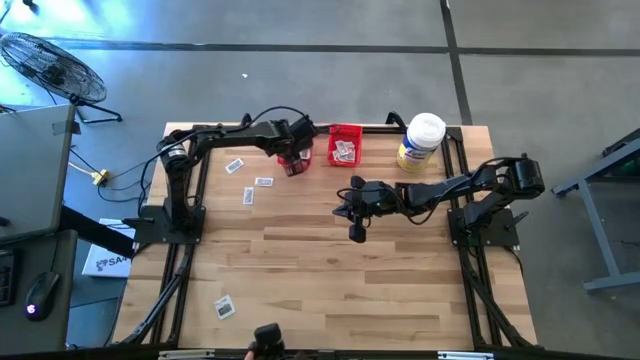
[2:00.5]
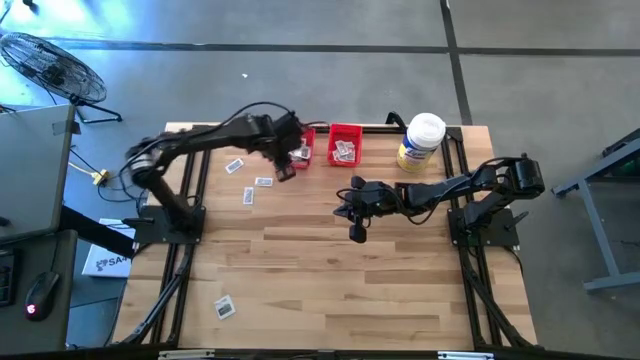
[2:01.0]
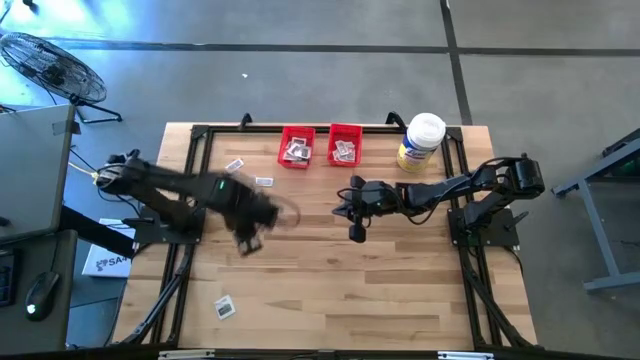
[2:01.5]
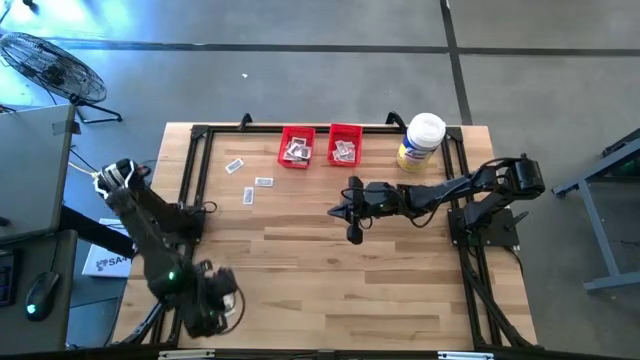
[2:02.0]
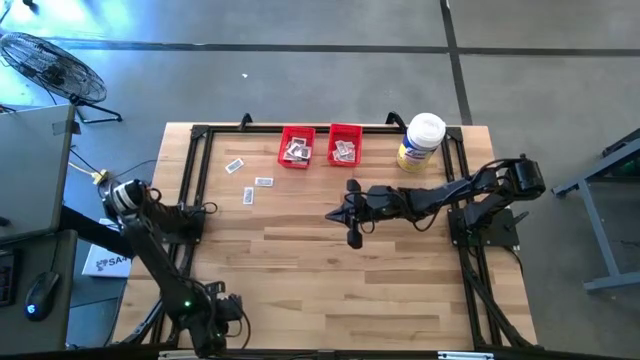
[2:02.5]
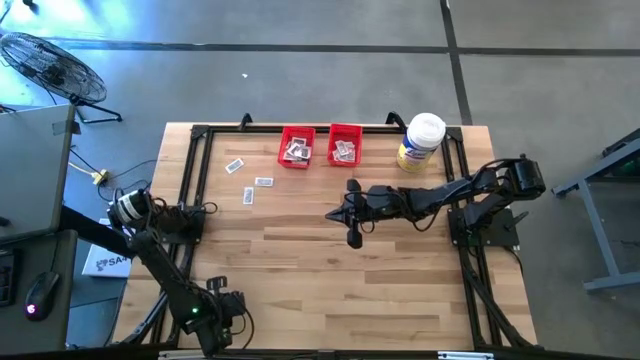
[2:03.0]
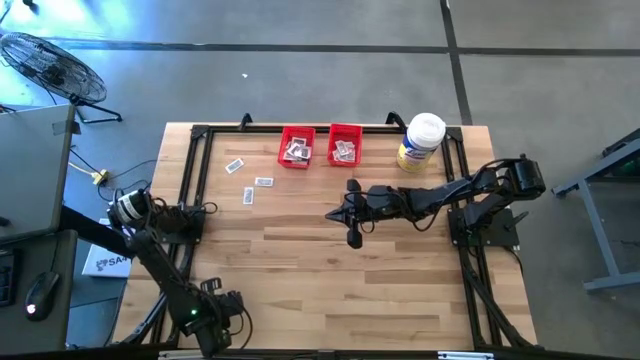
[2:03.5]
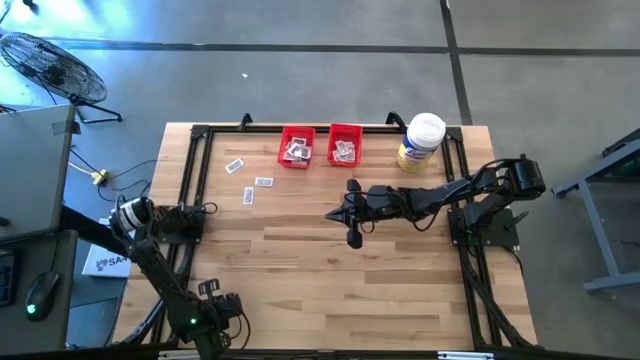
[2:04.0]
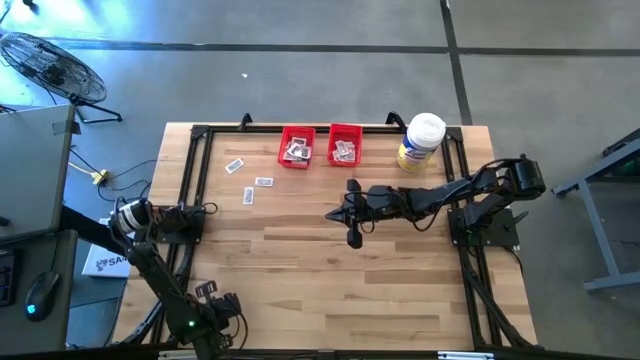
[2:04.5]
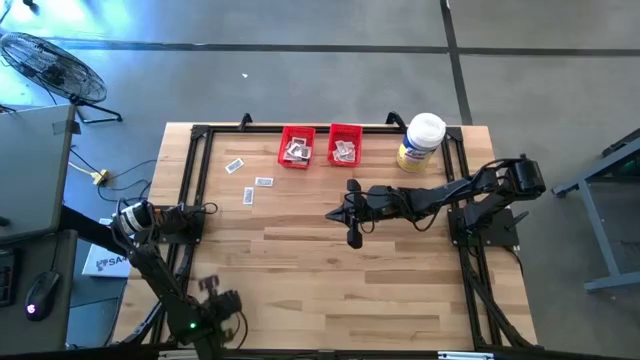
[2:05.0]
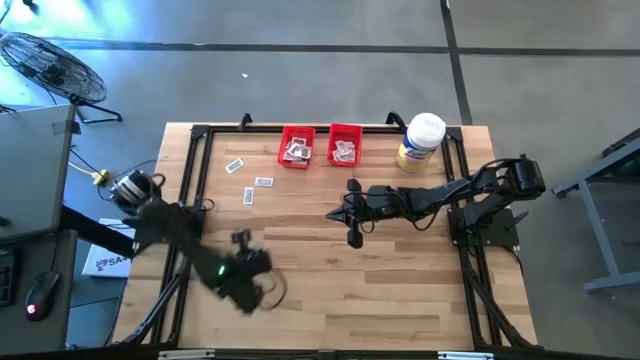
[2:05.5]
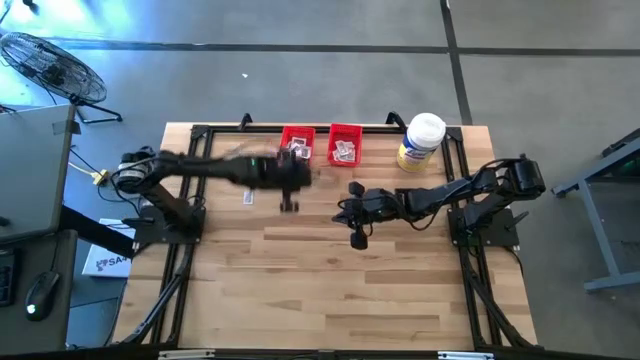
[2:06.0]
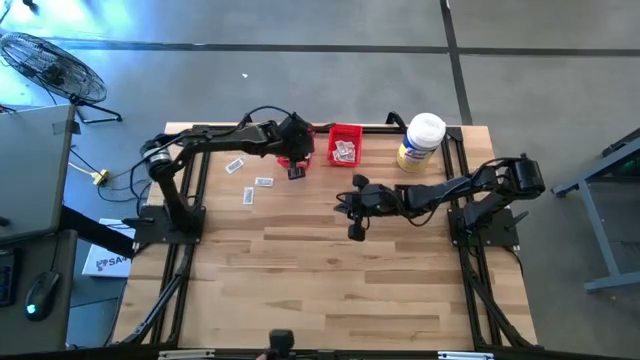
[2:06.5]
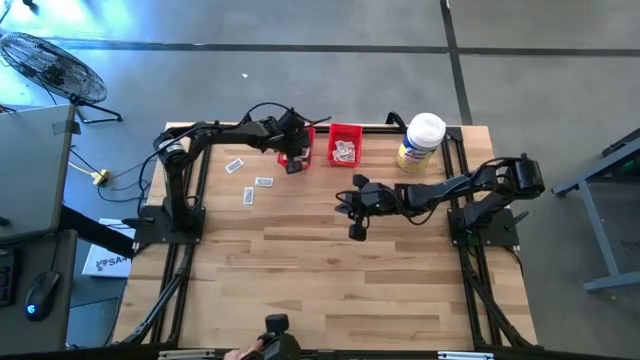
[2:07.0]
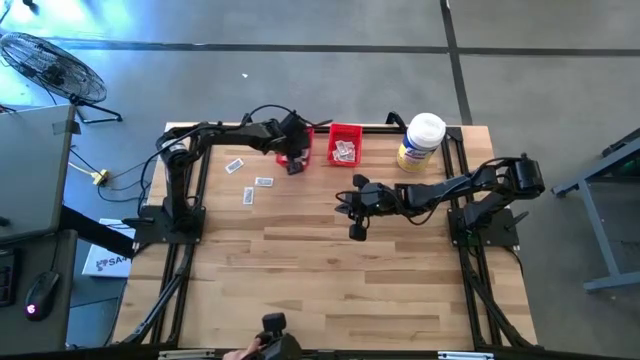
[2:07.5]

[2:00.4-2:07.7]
Task: Pick & Place First Aid Supplies
Put the towelette pack into the left red bin

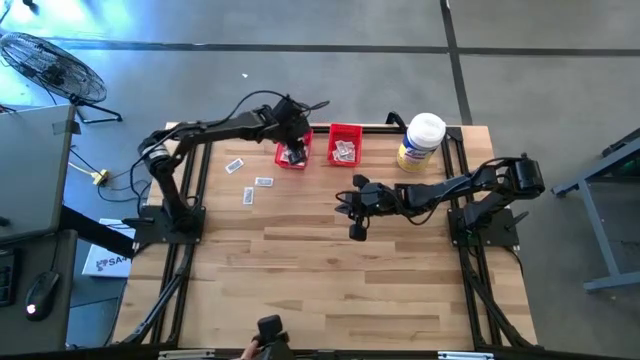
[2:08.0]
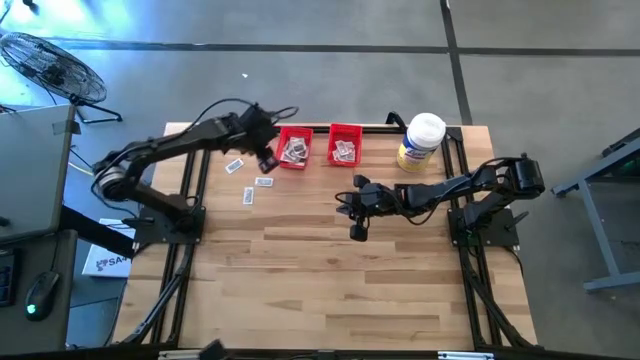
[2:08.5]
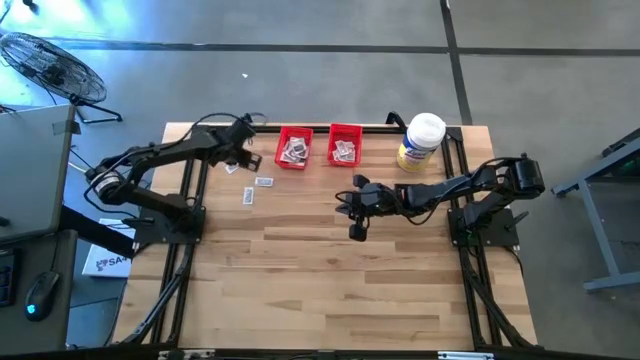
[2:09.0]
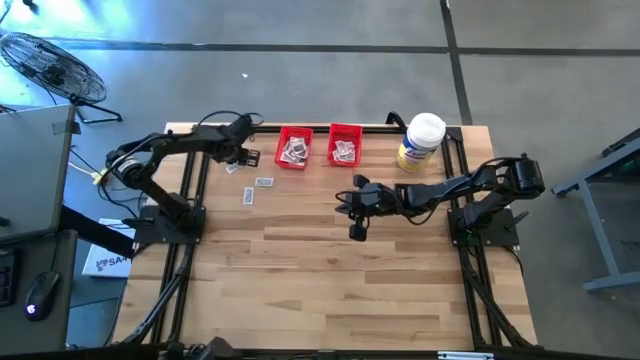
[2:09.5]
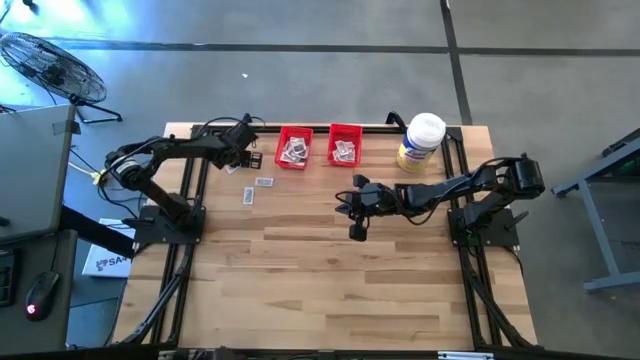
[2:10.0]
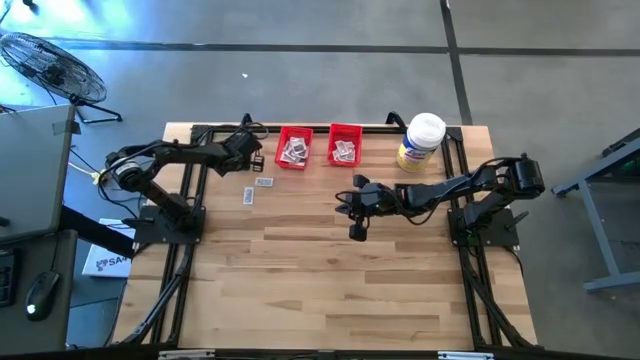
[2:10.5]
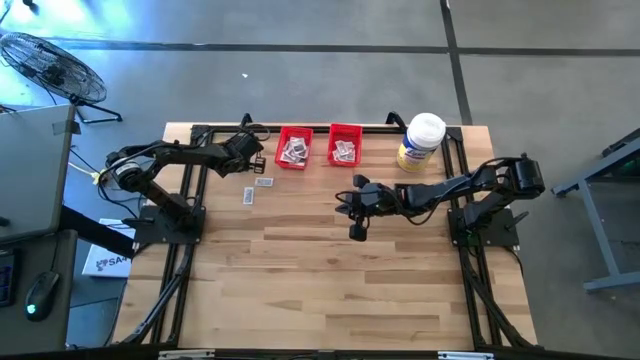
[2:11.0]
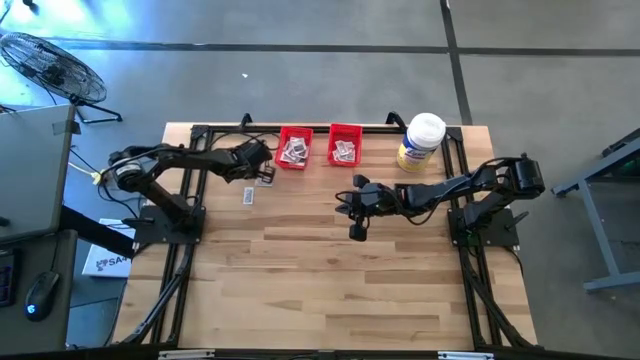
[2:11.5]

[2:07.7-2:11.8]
Put the ointment pack into the right red bin

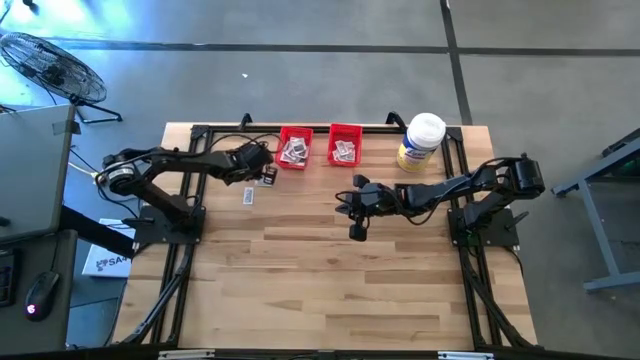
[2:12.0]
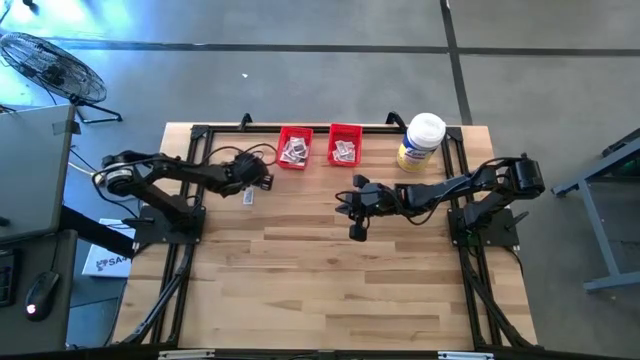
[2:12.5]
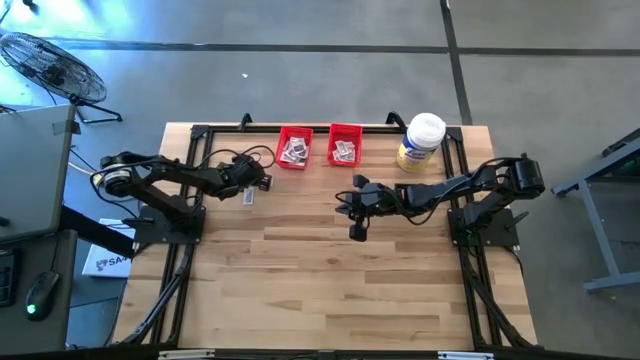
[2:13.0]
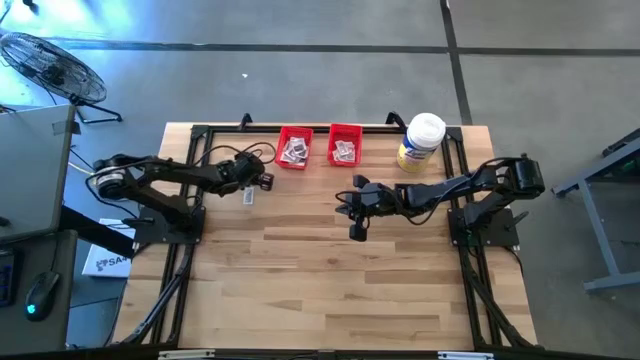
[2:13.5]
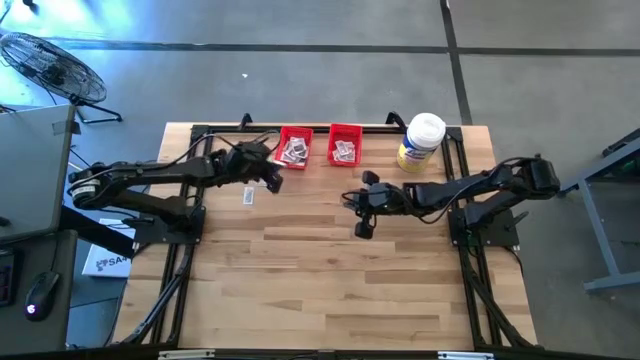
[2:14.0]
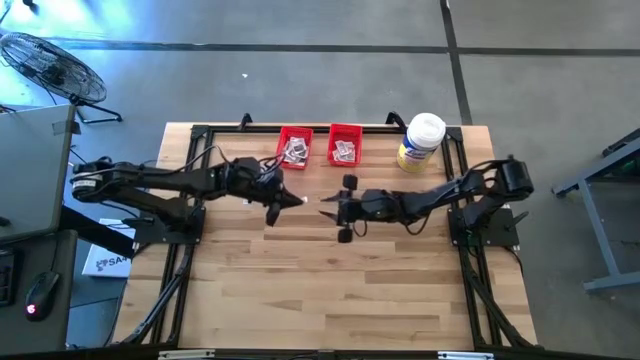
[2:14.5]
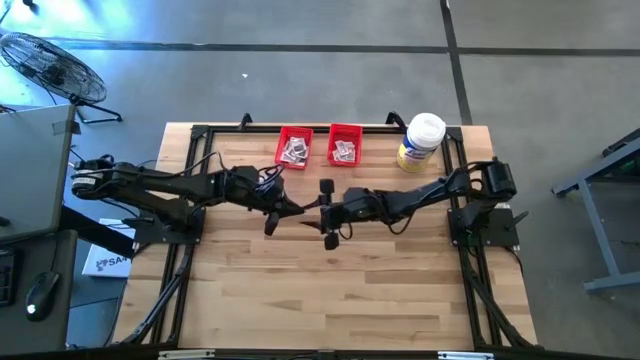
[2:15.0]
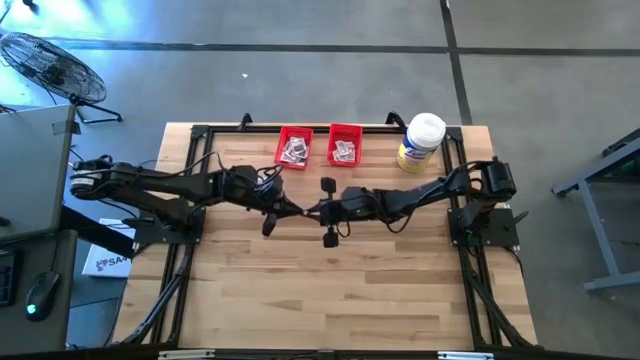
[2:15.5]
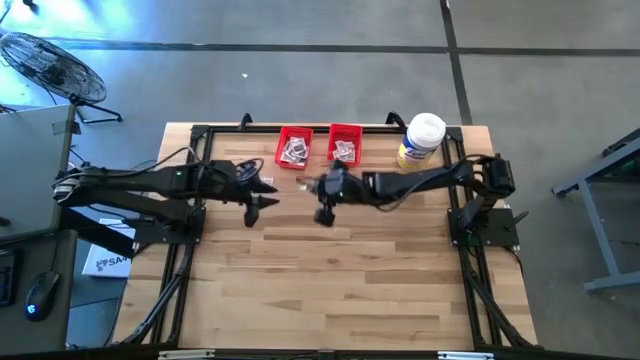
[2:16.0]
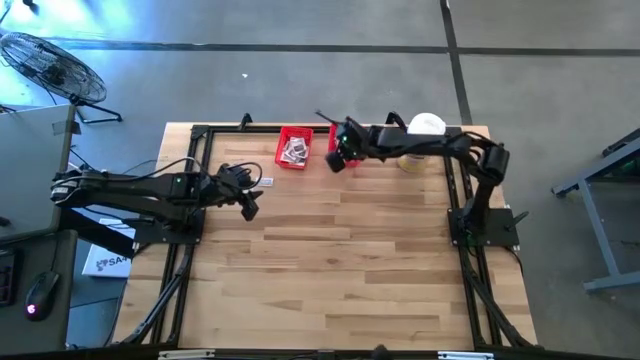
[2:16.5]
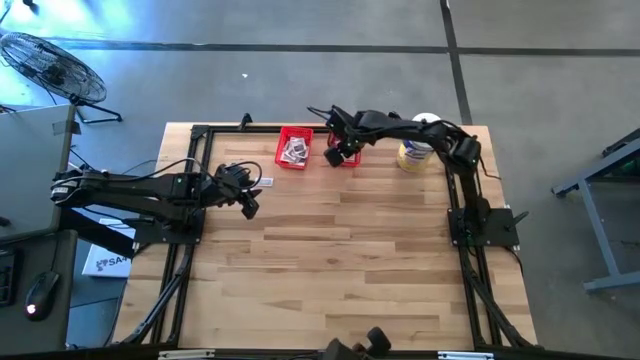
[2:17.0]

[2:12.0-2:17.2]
Put the ointment pack into the right red bin

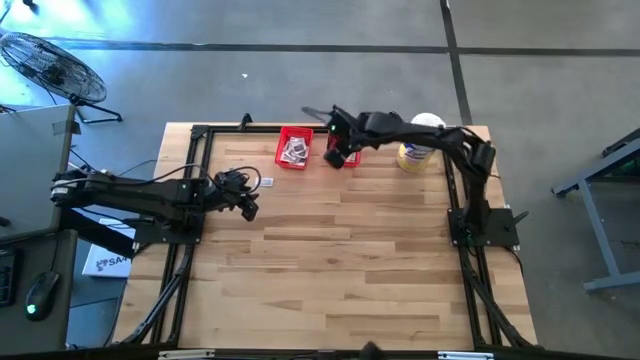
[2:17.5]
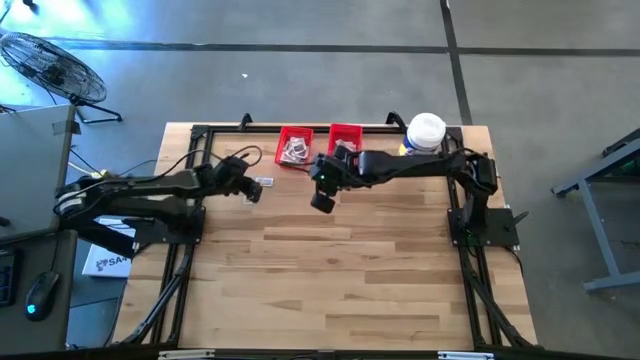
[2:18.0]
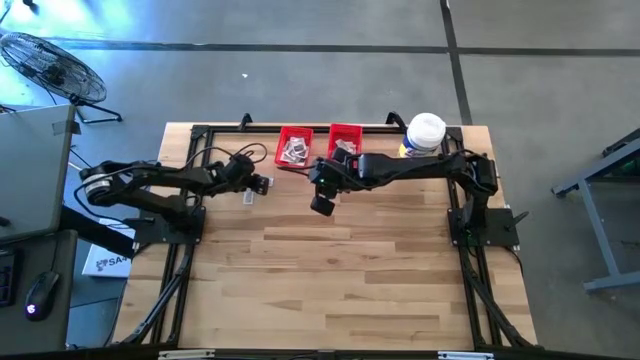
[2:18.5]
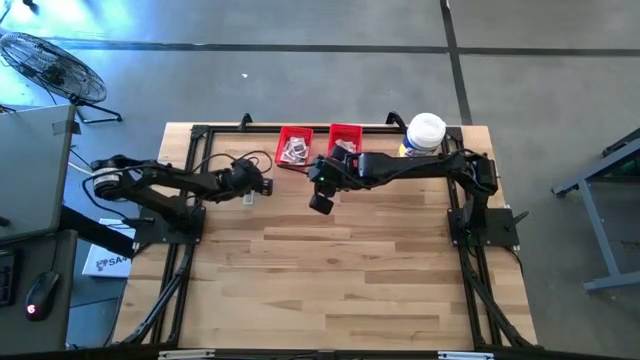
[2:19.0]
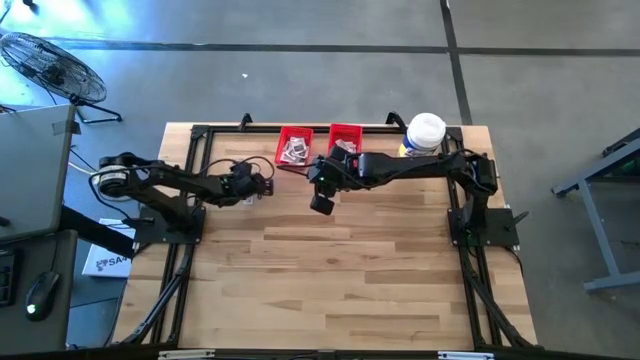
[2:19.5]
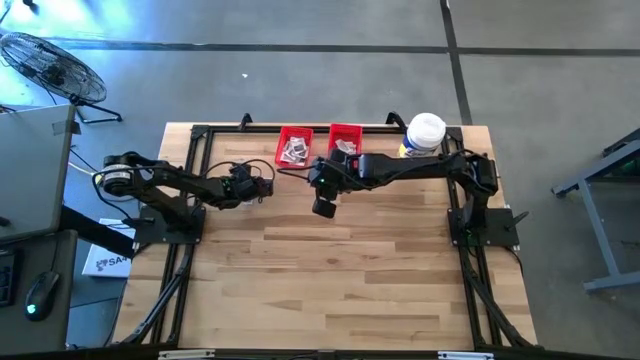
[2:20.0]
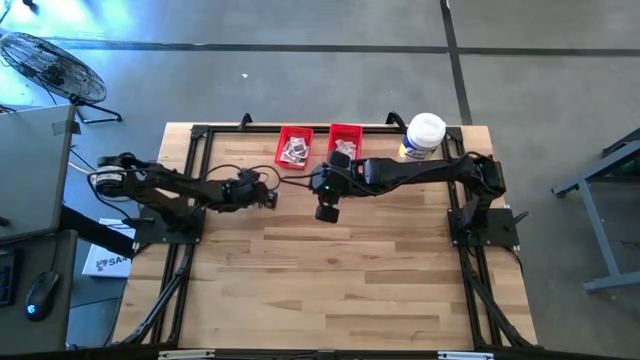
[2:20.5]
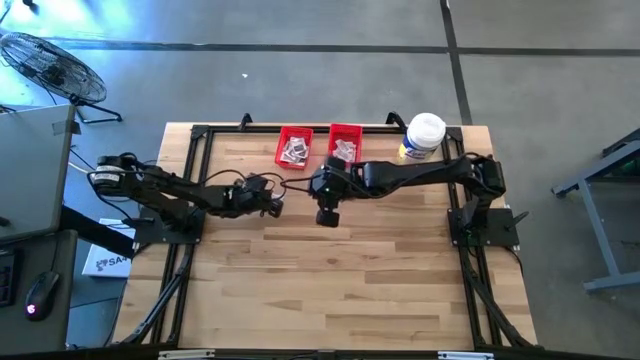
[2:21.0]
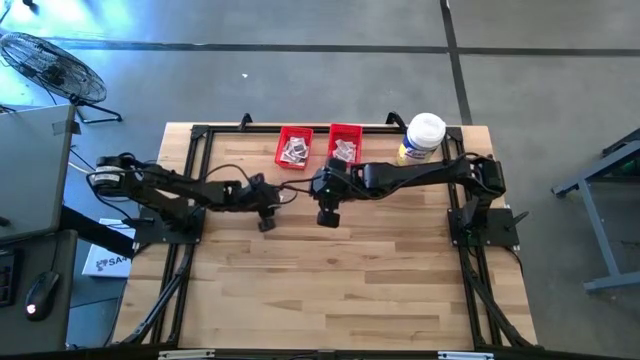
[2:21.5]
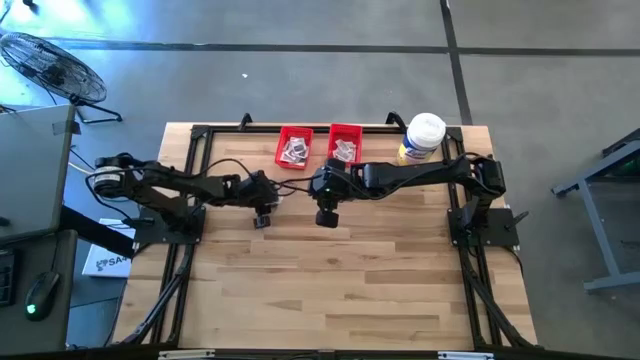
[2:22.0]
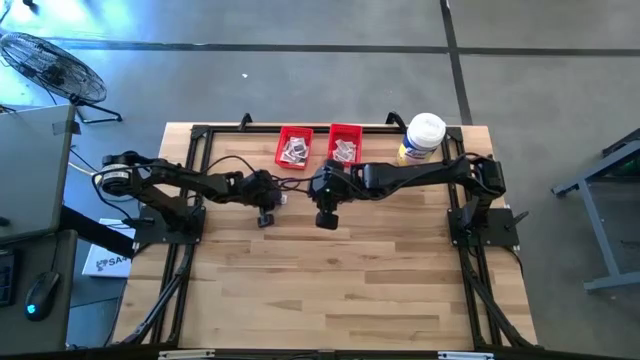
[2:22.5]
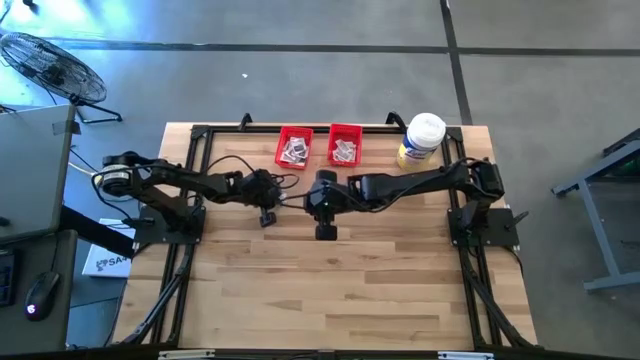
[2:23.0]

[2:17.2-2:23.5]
Put the ointment pack into the right red bin
